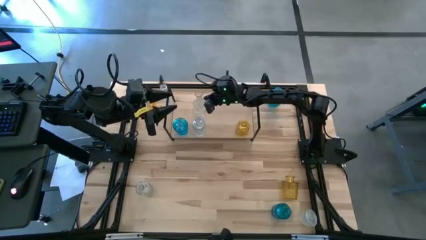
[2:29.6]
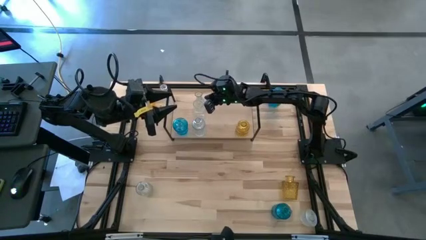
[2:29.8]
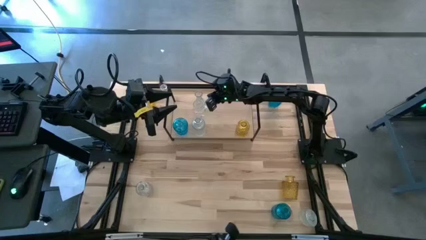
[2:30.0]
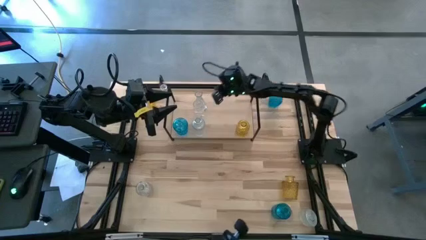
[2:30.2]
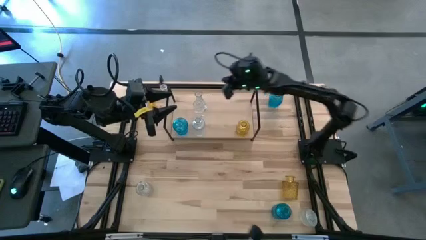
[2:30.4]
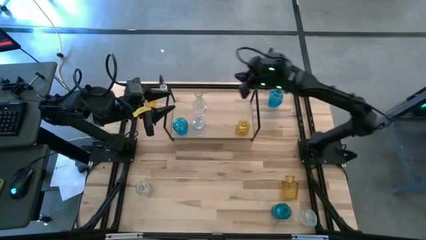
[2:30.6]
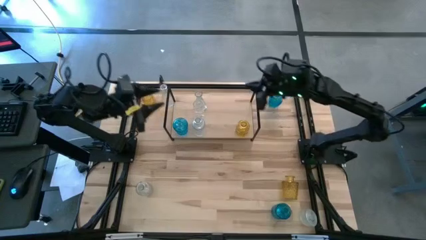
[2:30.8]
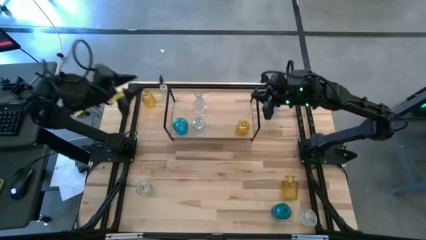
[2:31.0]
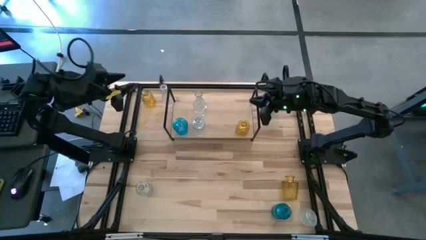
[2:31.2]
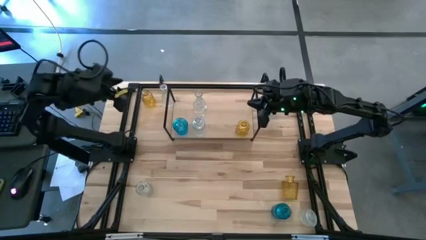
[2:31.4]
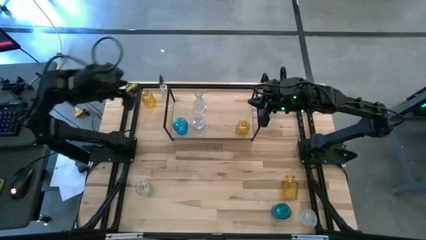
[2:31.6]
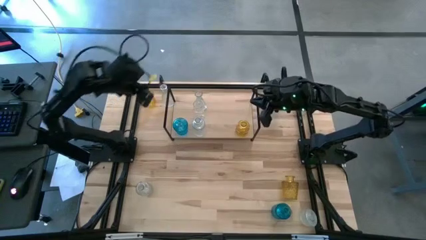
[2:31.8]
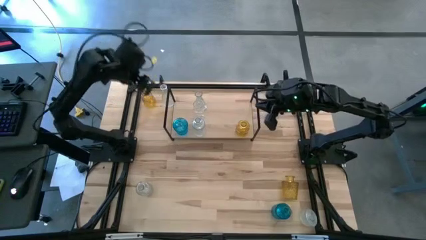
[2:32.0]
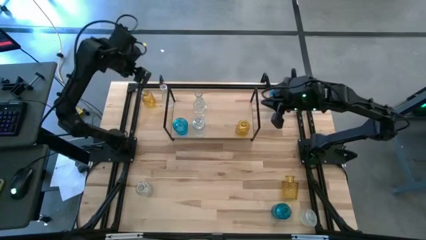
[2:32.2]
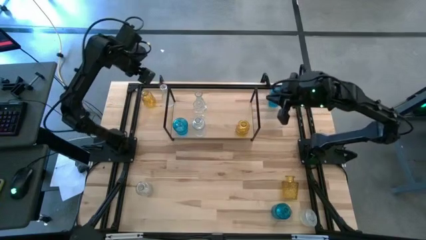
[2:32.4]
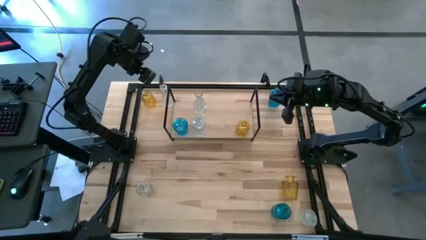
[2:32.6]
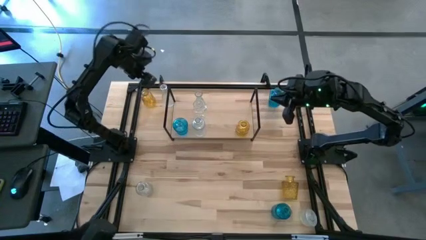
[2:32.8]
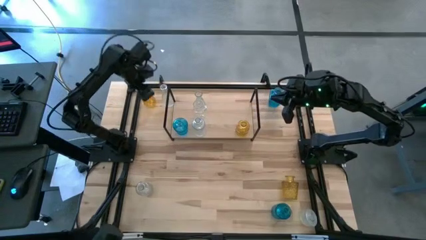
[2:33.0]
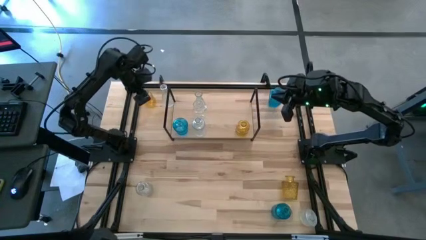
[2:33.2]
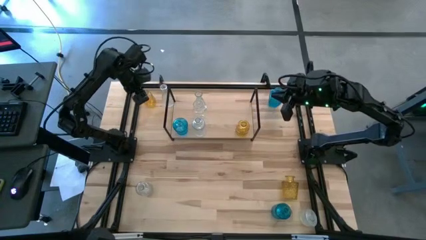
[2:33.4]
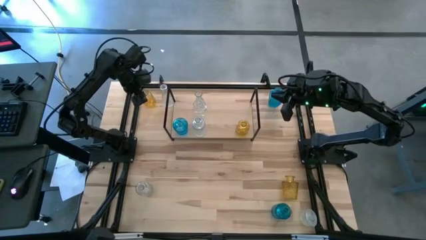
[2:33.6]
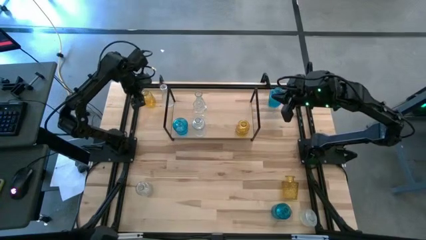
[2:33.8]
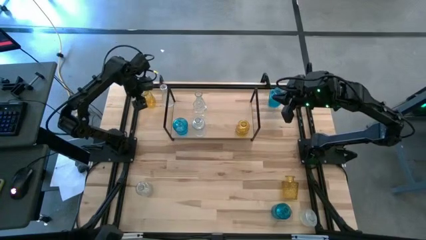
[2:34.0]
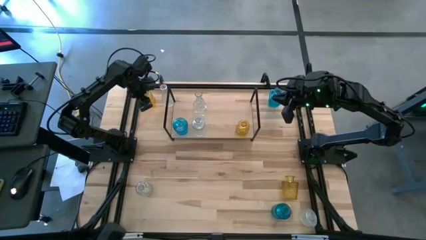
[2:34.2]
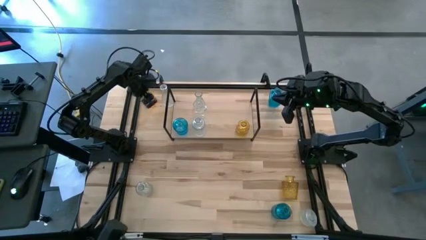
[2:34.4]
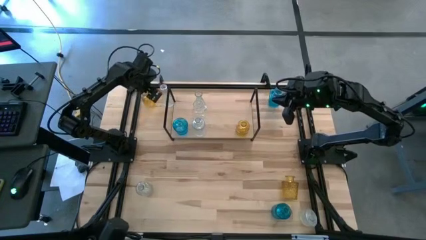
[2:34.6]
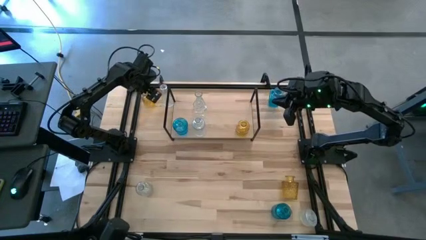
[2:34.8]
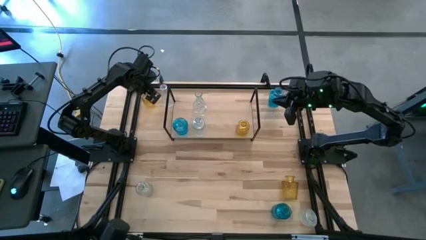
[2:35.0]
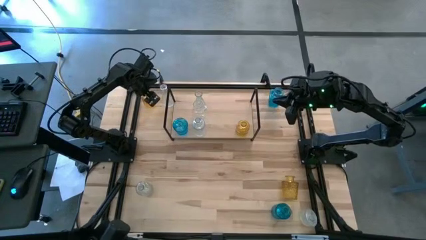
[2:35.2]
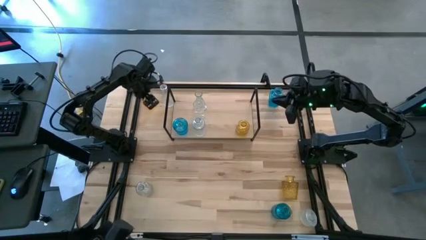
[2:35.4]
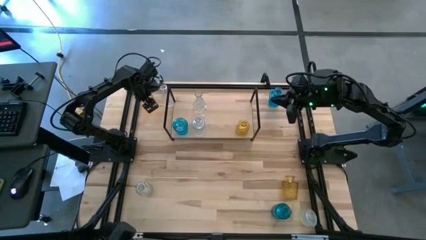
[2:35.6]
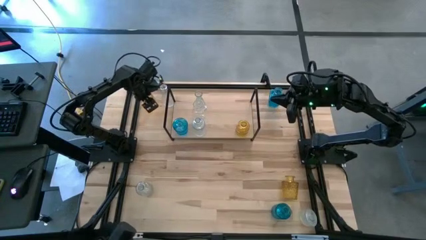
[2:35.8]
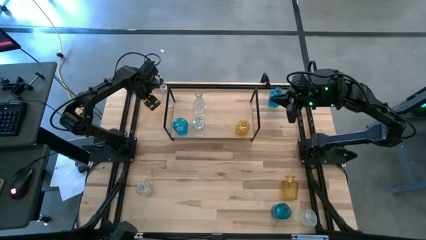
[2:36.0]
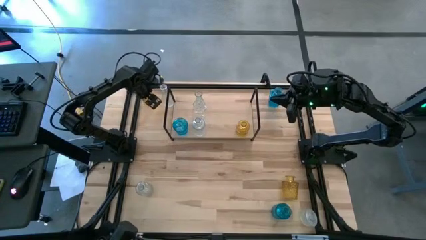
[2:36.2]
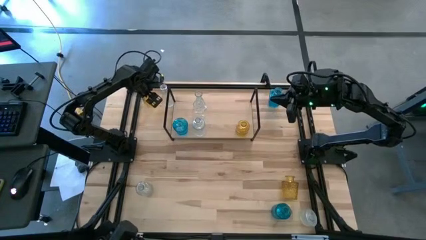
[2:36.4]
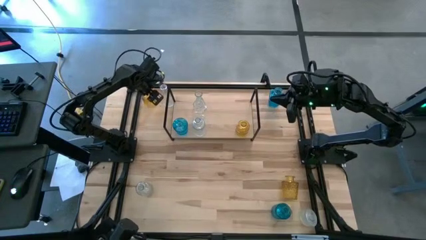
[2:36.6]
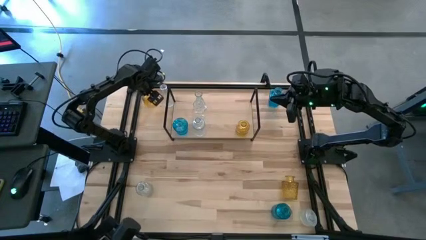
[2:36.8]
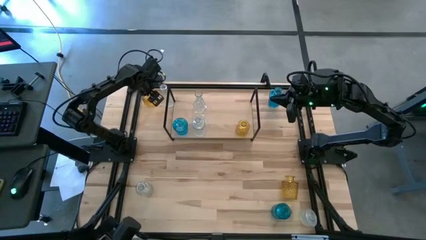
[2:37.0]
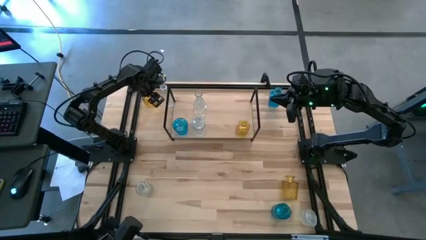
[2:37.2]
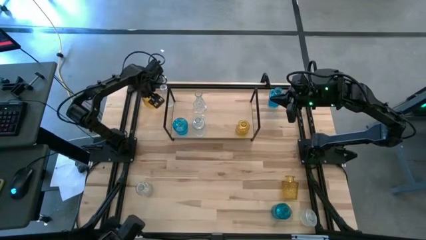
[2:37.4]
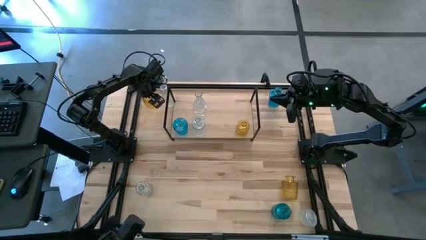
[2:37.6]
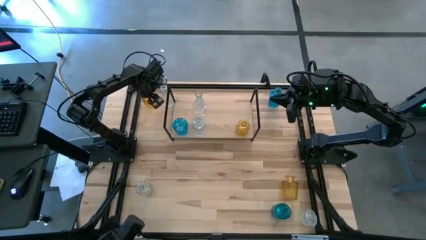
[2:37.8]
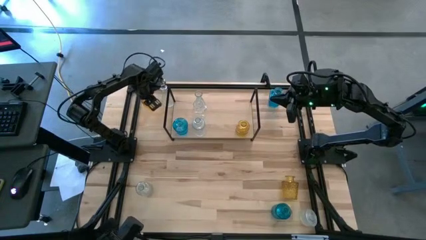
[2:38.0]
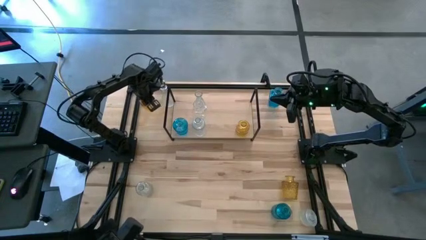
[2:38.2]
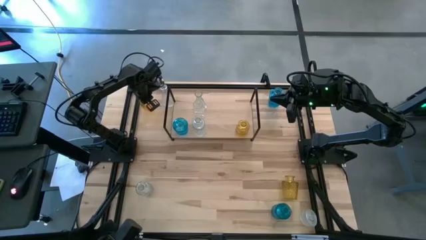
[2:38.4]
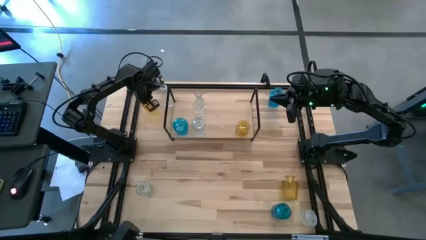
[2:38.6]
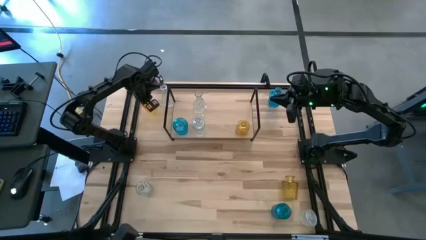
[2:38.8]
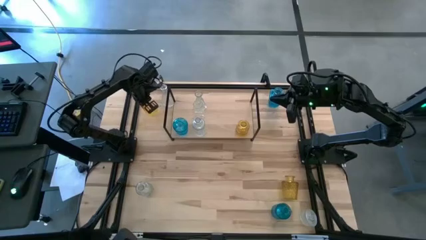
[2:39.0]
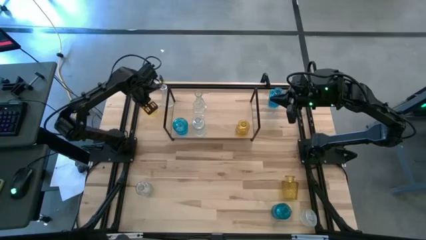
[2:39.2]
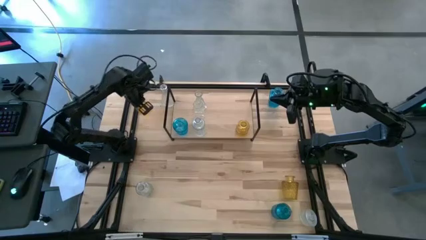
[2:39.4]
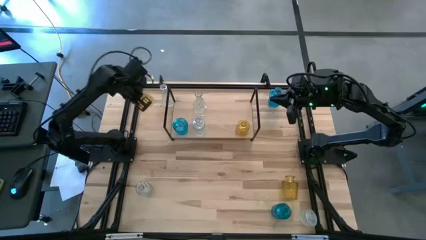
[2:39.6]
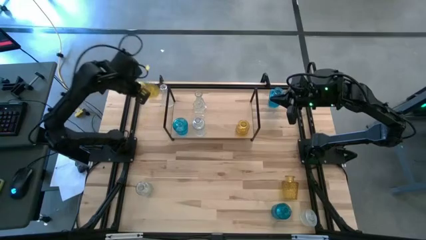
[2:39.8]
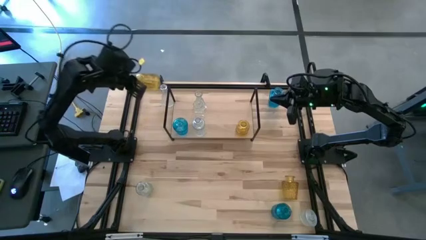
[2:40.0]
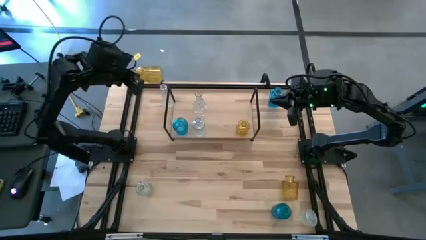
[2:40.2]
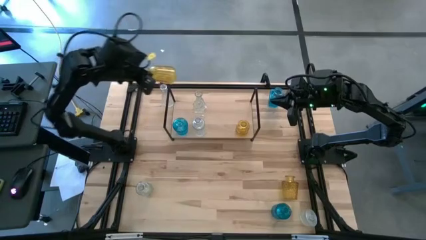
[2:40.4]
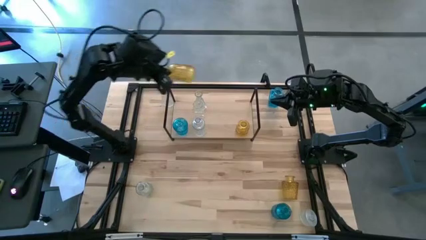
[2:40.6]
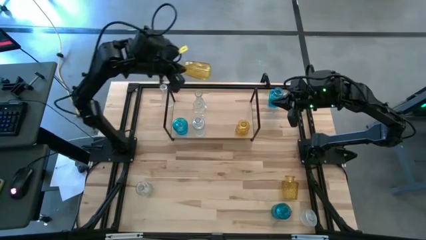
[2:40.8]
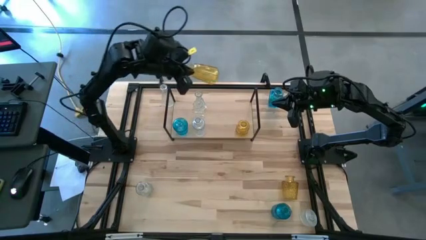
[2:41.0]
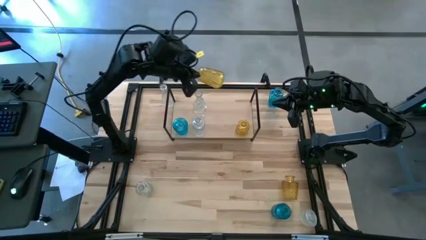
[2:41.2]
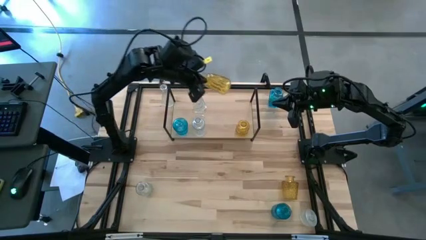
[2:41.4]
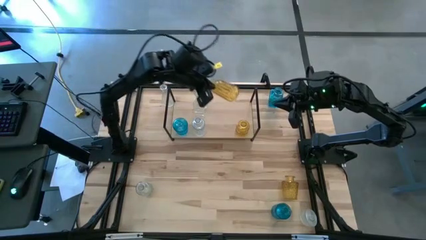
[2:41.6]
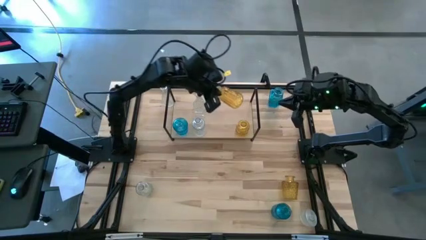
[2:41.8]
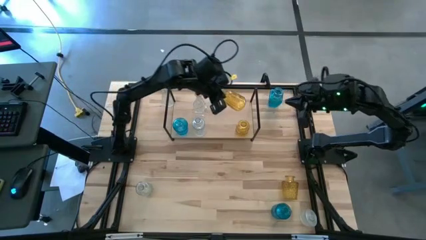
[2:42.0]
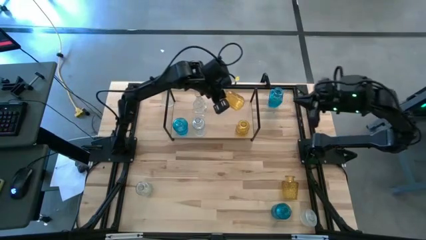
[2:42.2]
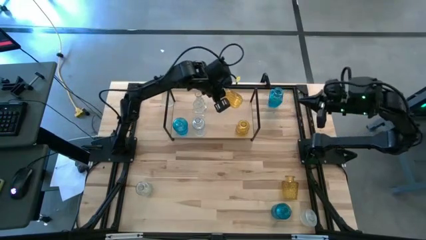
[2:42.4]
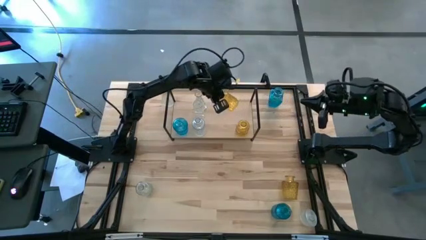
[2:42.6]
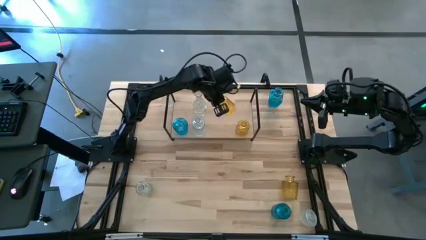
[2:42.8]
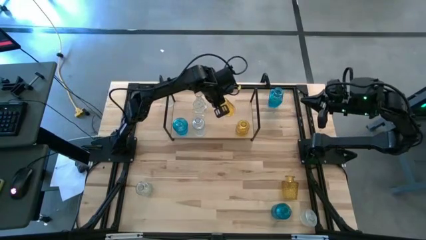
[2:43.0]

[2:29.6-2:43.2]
Task: sort vases onto shelf
Put the yellow vase on the shelf aligned with the other yellow vase
